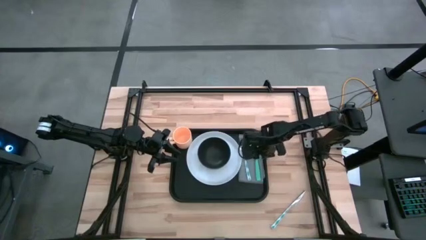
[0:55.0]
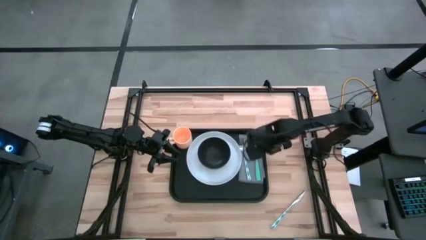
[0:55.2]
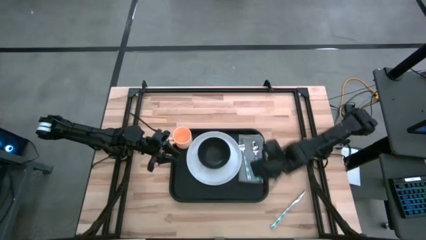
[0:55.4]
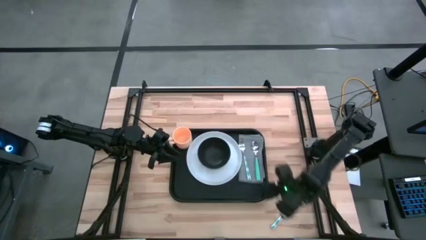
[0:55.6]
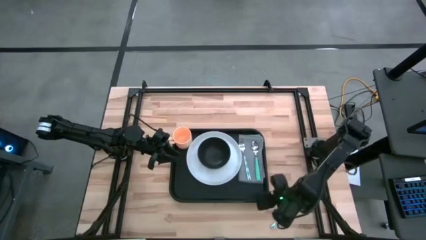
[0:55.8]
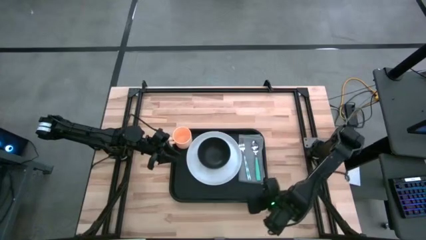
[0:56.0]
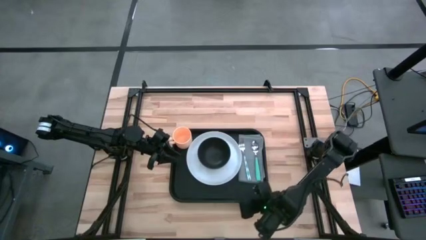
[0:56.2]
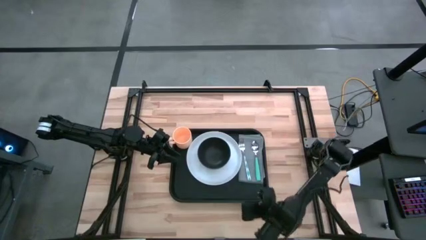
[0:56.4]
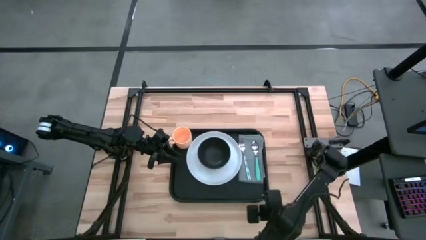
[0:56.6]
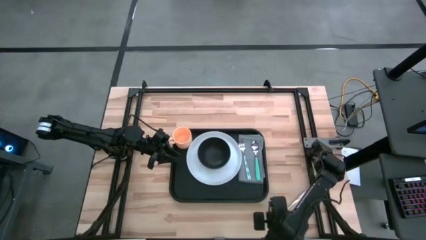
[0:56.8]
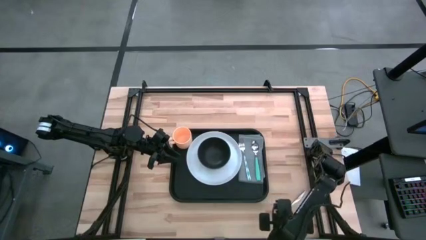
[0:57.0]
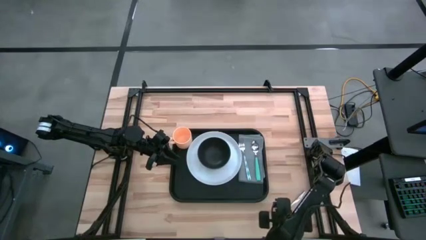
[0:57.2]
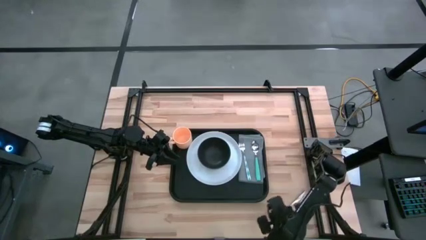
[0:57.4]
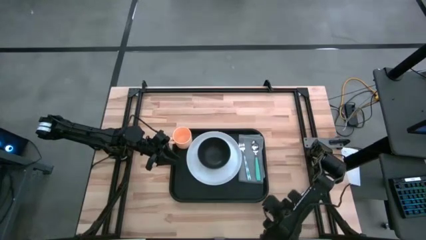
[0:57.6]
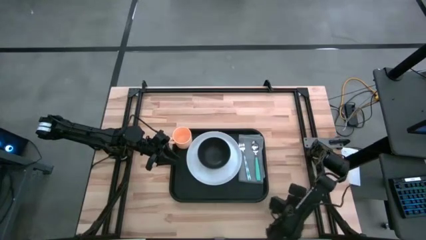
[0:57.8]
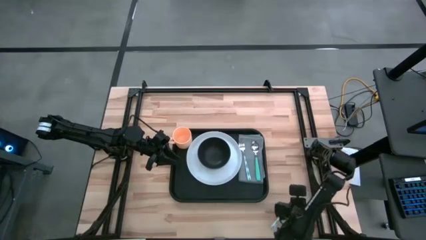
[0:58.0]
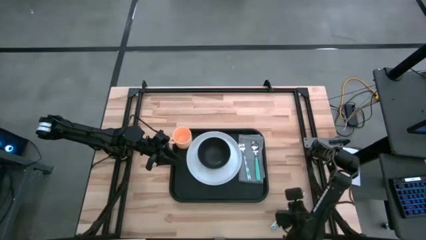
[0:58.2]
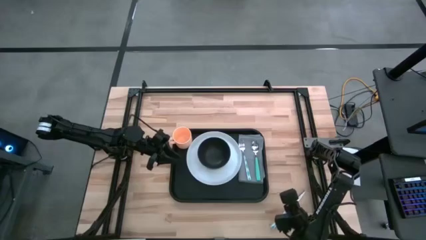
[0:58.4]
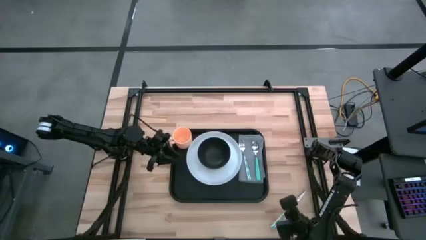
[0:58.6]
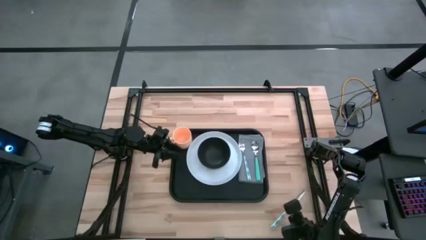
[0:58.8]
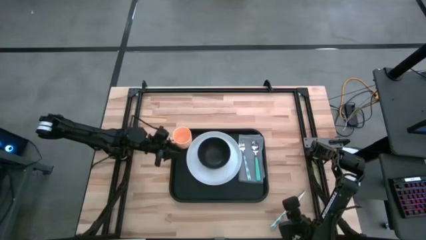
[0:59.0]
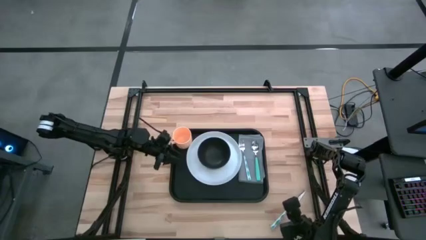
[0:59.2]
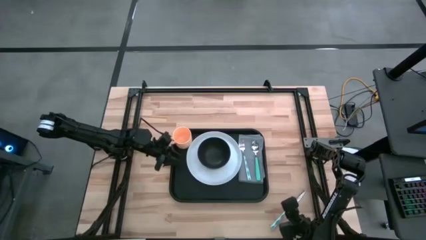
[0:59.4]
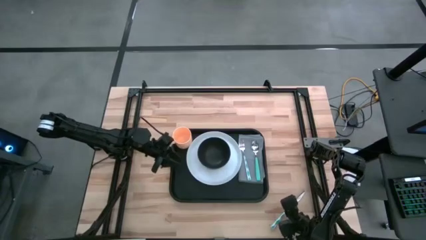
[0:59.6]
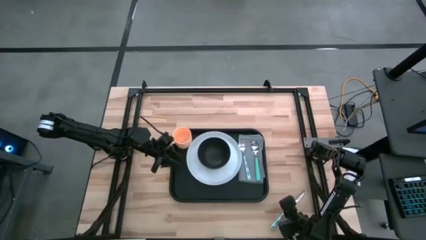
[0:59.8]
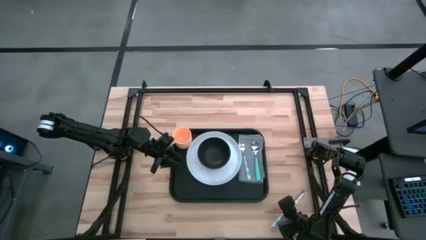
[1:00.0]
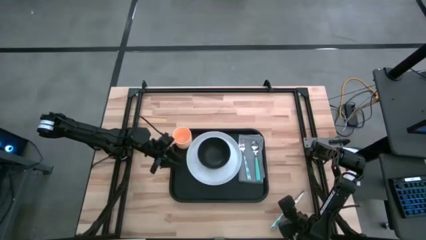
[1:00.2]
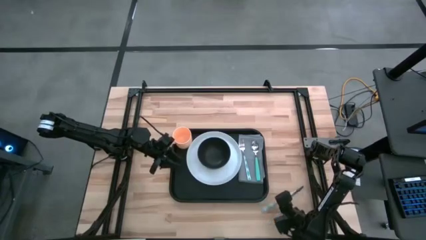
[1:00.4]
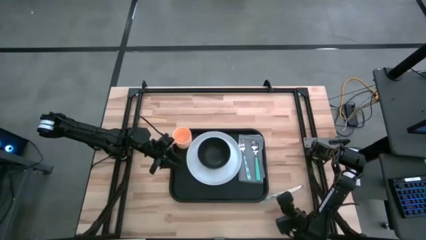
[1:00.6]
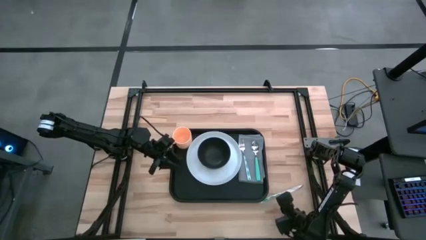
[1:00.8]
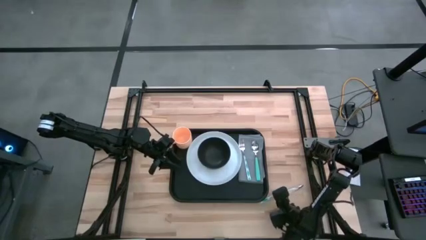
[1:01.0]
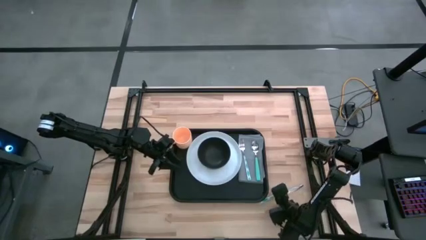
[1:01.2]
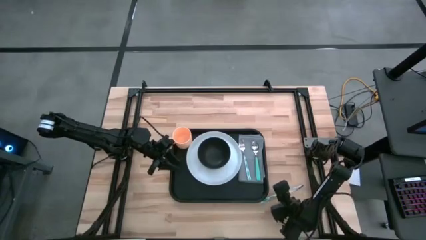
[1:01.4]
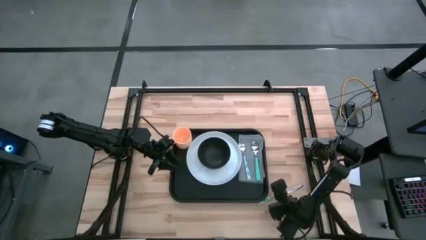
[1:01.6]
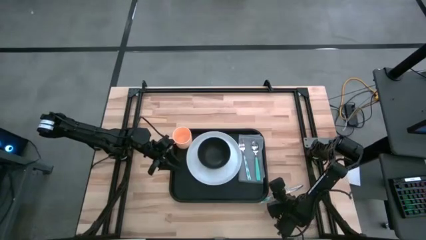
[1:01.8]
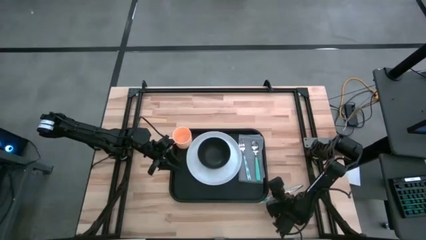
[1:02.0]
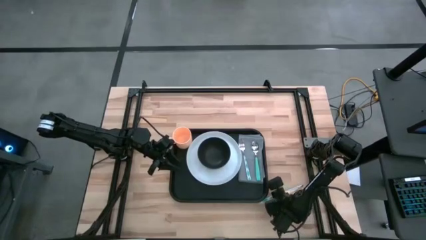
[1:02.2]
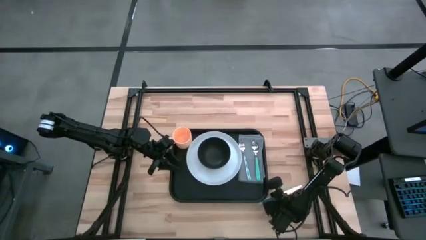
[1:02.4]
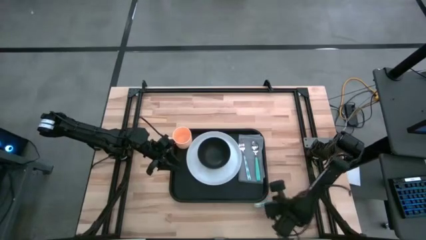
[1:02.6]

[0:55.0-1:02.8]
Task: Set up tray
Put the blue knife on top of the gray napkin on the black serving tray

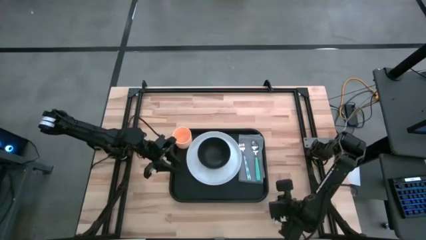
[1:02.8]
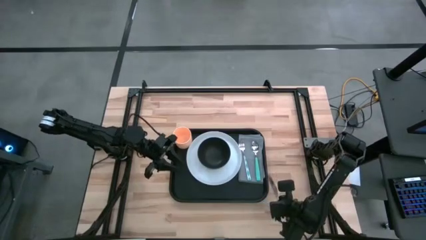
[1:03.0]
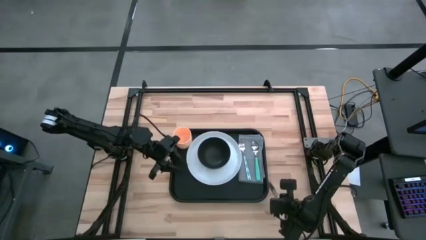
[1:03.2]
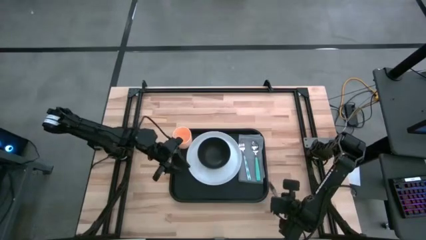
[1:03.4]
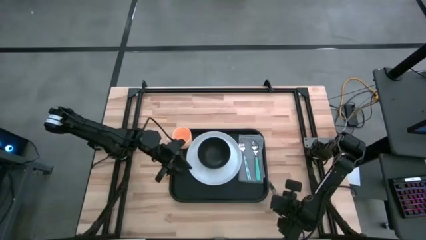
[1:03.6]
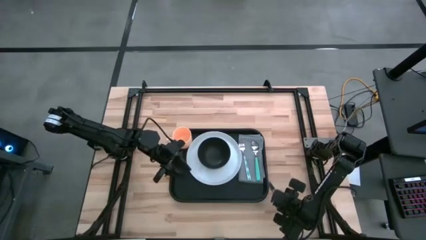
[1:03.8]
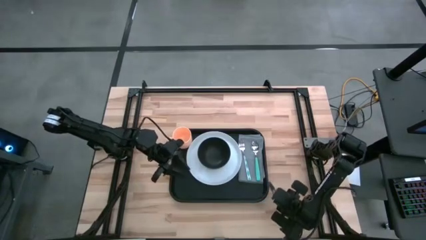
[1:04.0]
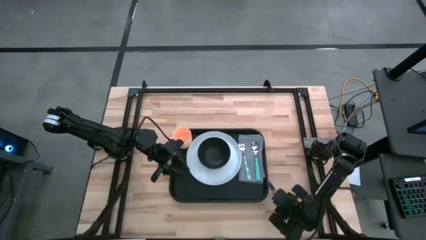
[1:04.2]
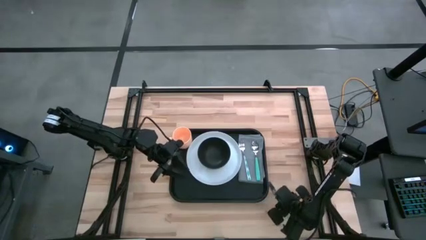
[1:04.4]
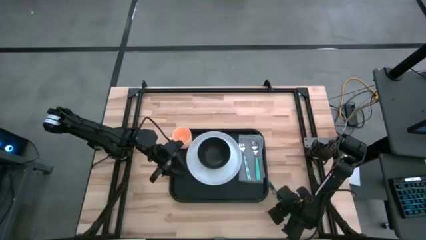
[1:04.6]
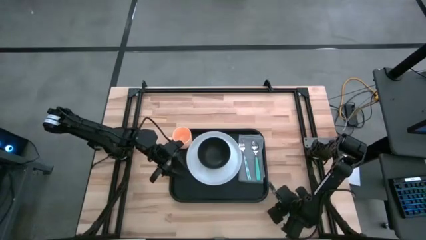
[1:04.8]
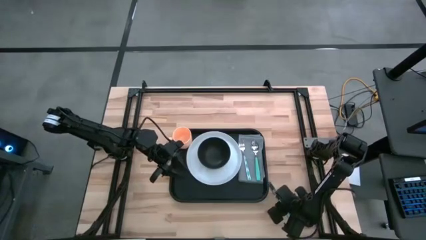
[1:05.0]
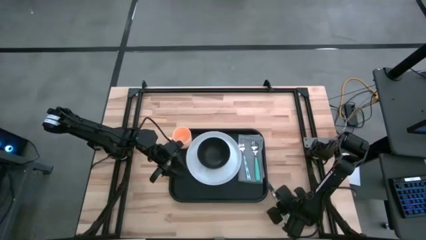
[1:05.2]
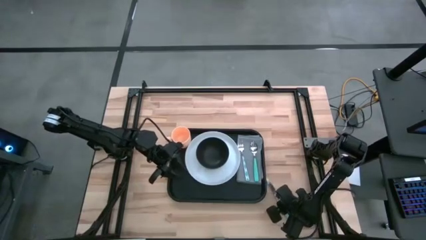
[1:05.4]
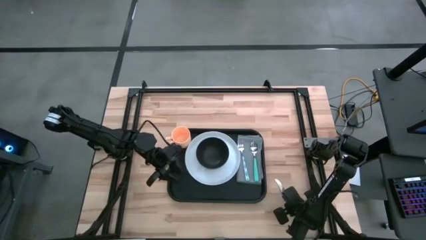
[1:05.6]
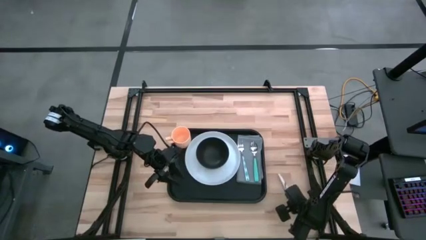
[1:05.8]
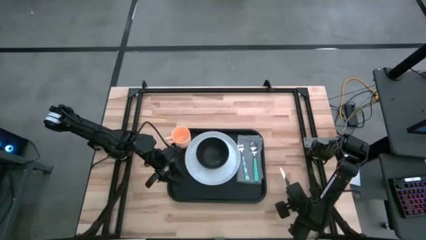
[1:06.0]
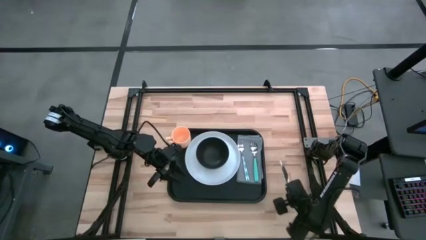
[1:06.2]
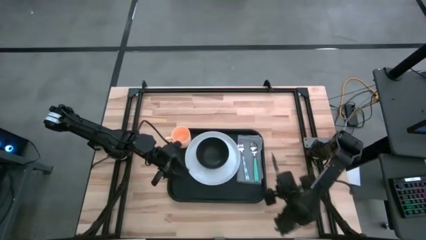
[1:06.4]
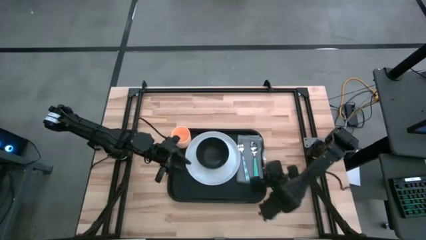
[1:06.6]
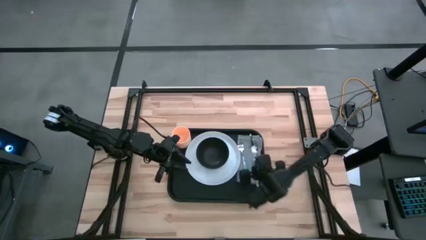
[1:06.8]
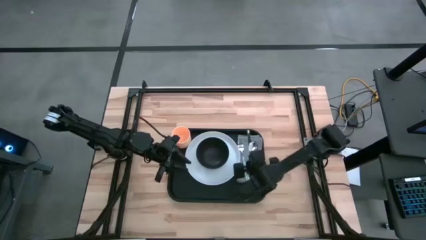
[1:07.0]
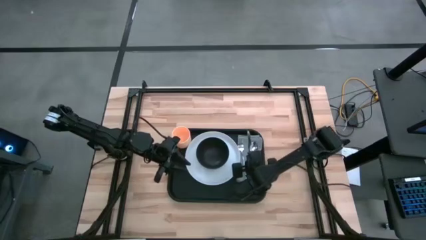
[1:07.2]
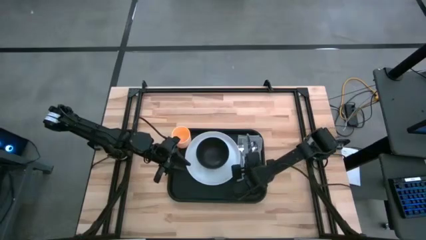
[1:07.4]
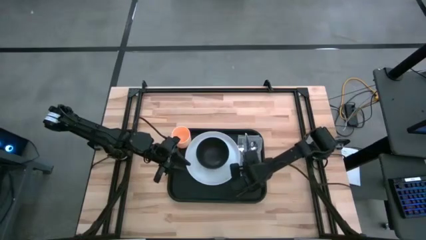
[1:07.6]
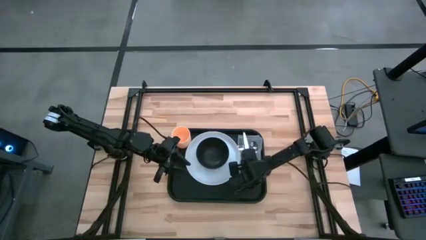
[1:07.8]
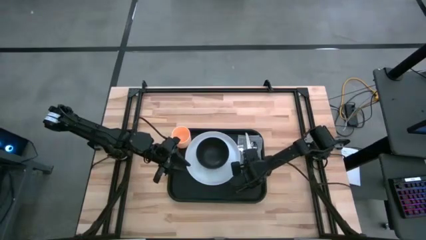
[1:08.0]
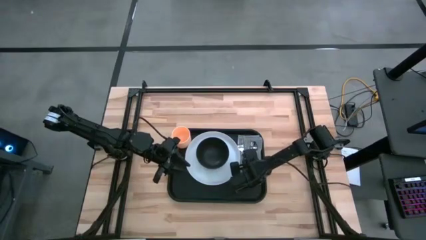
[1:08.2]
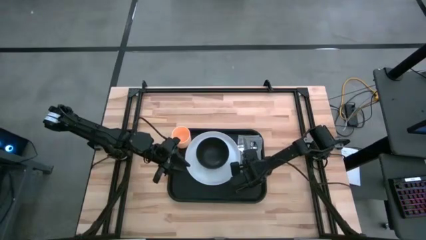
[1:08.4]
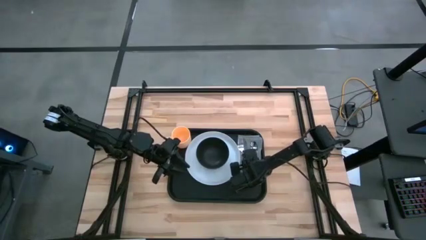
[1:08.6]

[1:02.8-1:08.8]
Put the blue knife on top of the gray napkin on the black serving tray

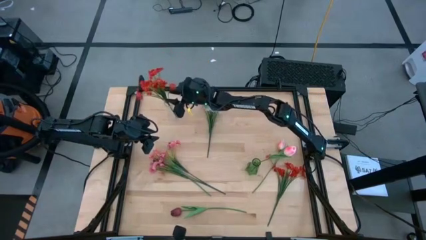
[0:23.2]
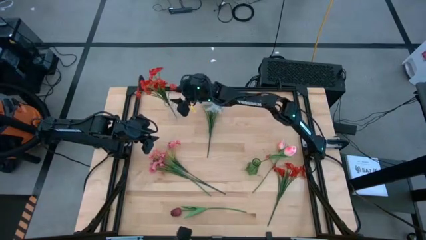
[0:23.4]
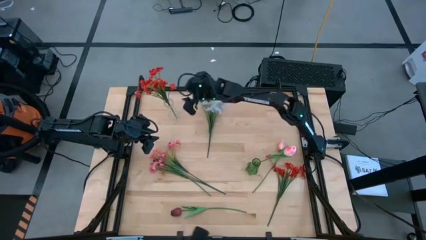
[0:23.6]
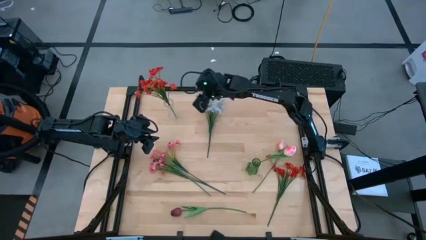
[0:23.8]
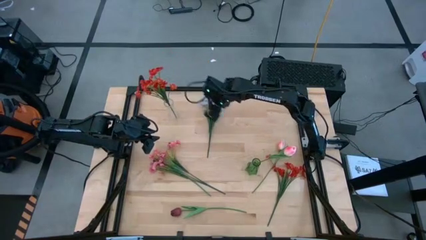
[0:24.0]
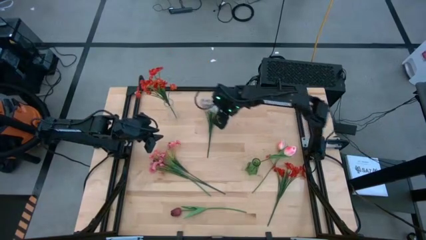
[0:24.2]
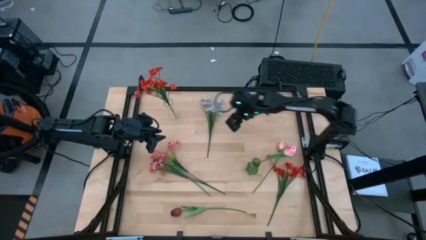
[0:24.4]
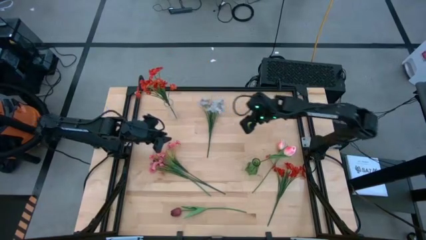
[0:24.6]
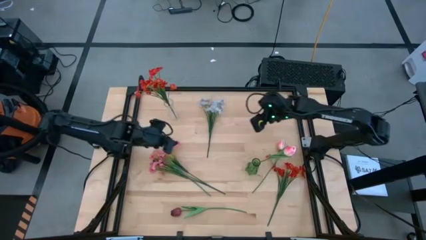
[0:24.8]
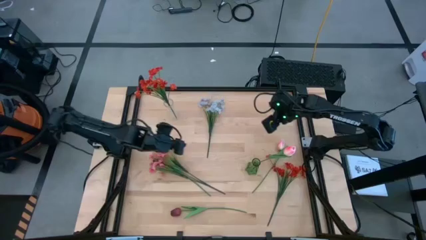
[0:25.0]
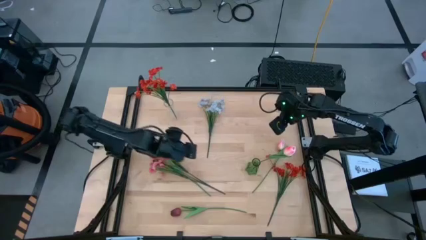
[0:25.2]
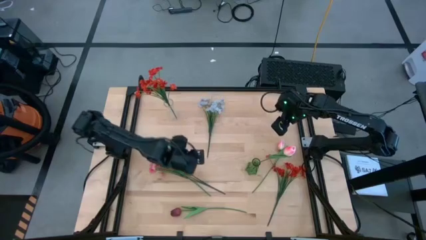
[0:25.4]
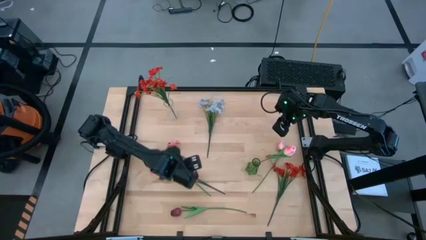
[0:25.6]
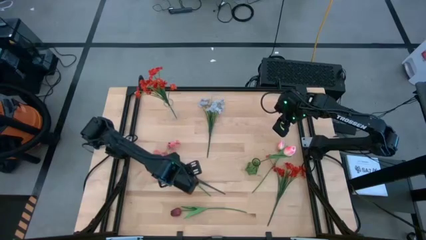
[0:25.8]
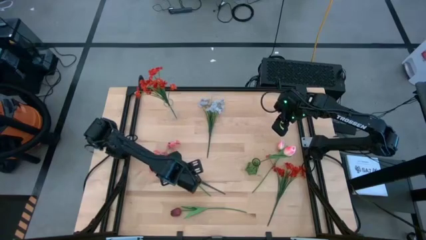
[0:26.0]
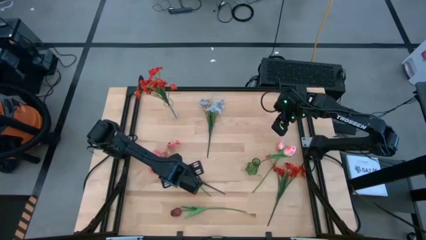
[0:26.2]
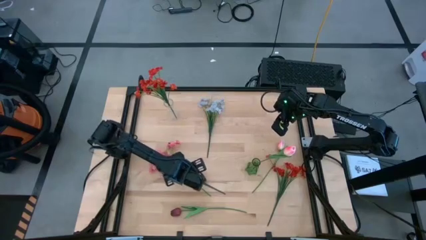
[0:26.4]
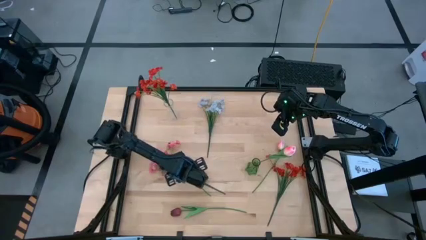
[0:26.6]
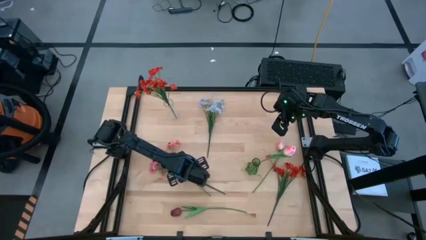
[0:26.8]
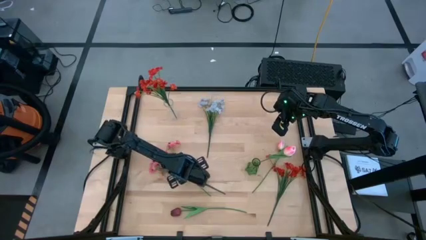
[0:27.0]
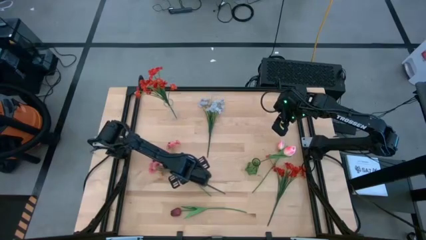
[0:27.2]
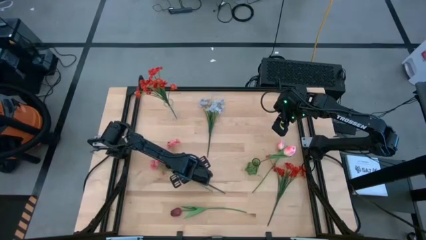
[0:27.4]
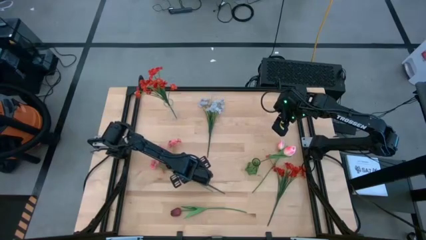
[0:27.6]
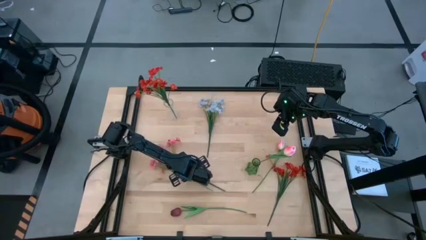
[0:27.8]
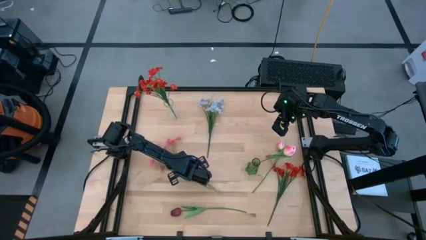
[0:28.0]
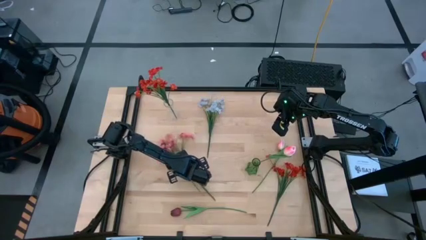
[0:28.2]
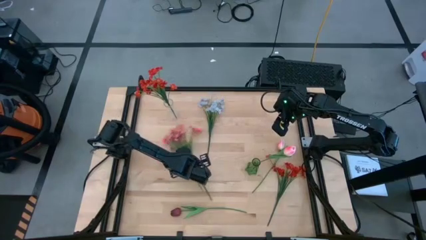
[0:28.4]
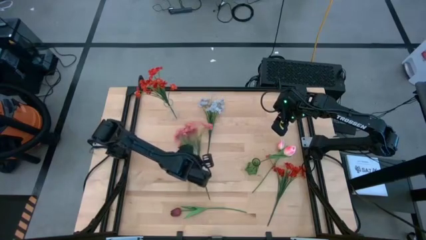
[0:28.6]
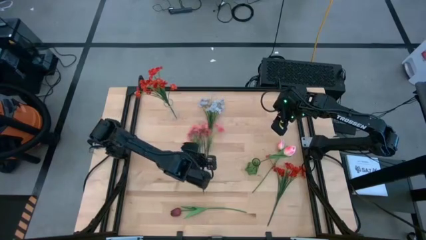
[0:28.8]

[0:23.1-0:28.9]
Task: Sort flowers into vase by color
Put the pink flowers into the green vase
